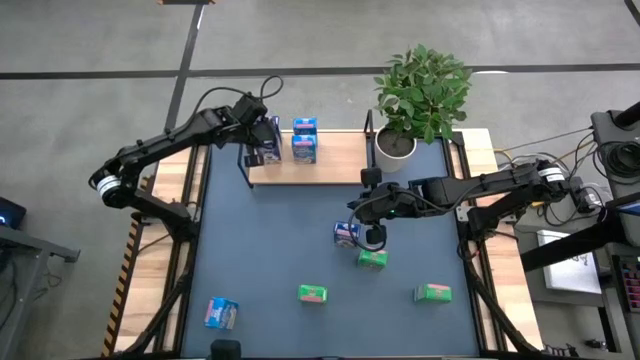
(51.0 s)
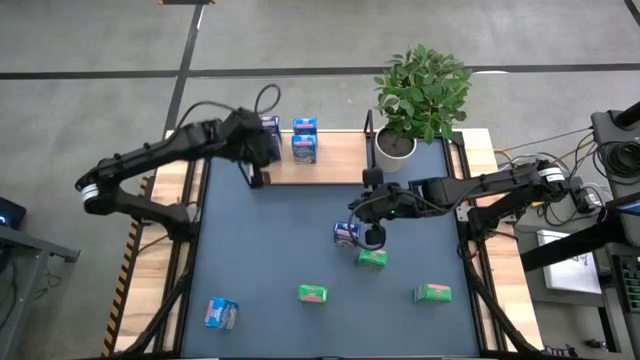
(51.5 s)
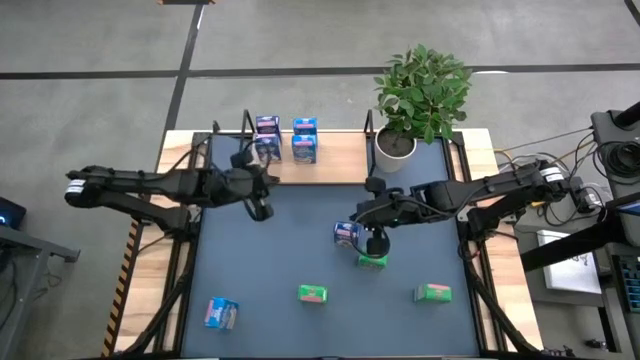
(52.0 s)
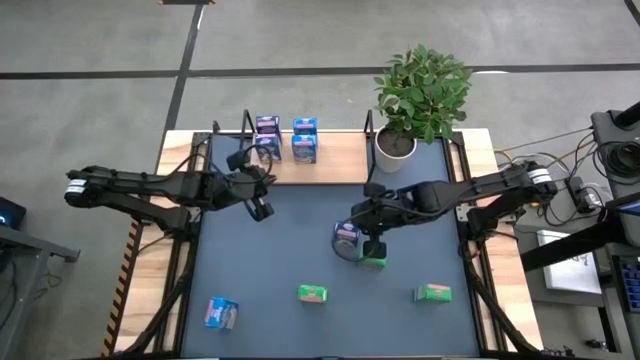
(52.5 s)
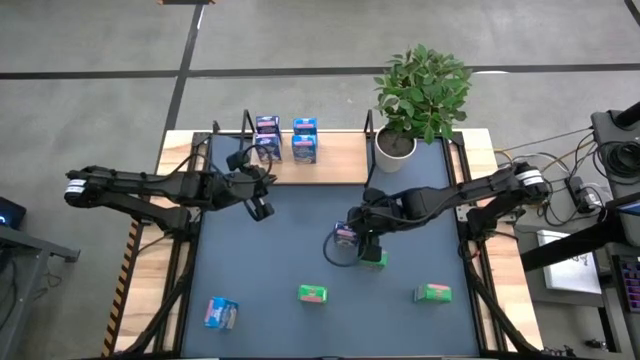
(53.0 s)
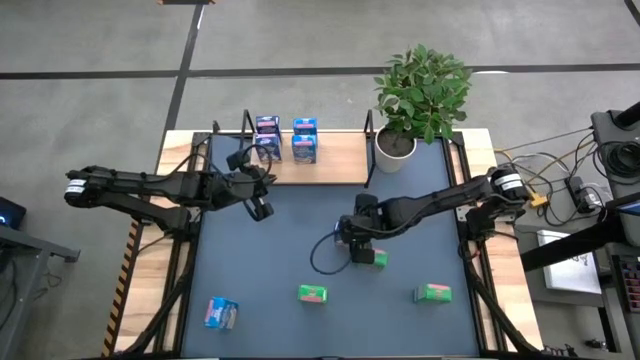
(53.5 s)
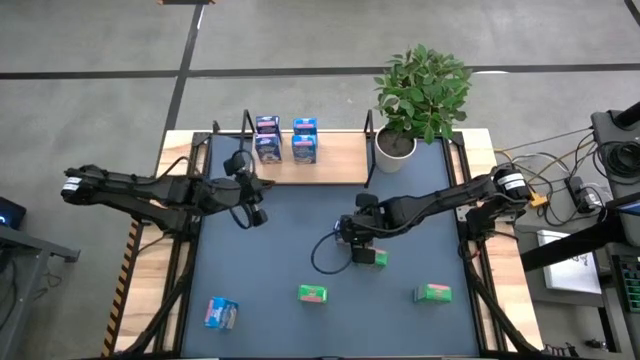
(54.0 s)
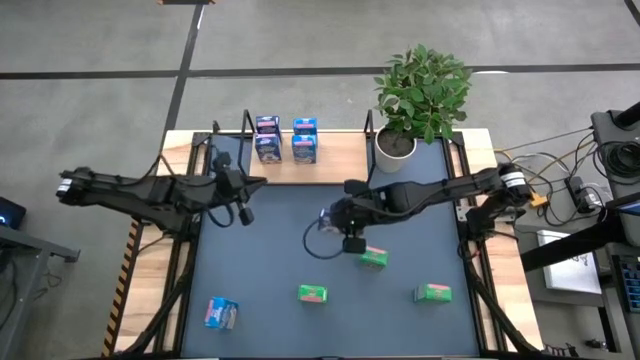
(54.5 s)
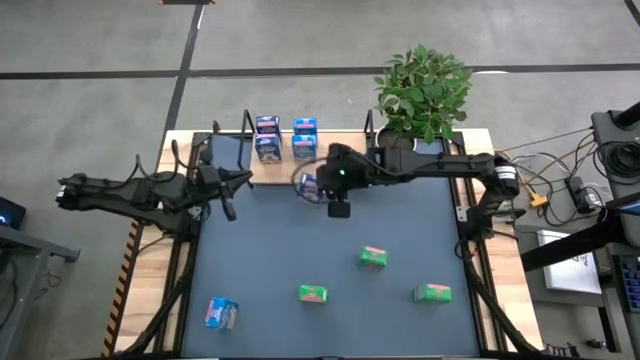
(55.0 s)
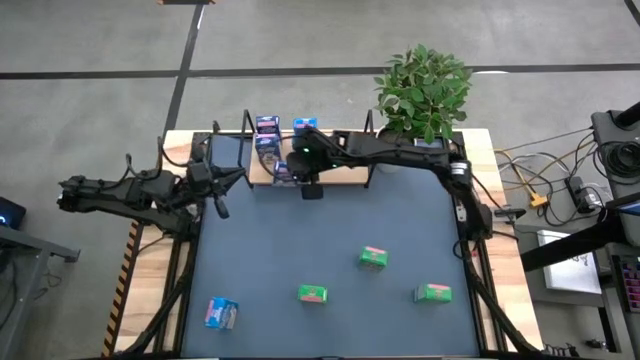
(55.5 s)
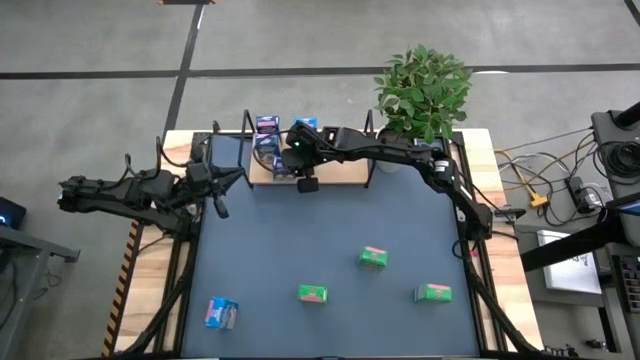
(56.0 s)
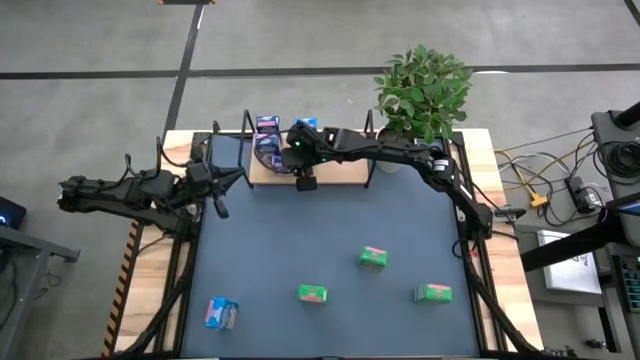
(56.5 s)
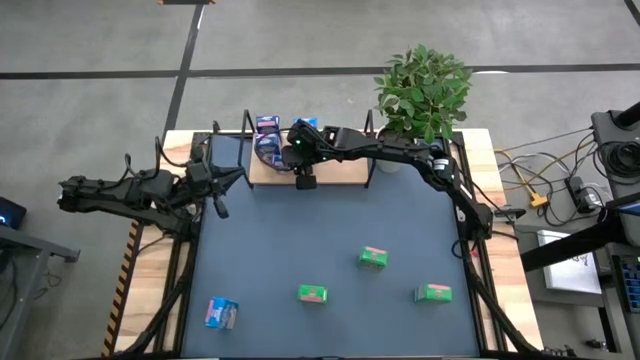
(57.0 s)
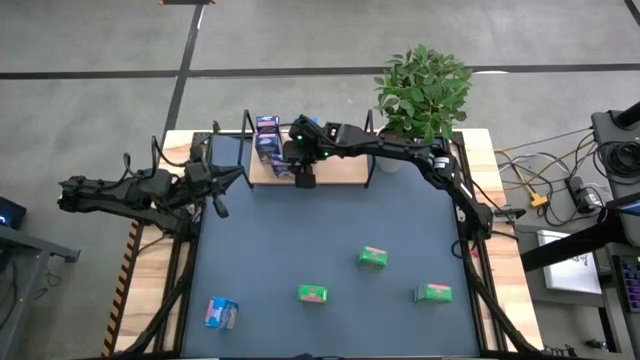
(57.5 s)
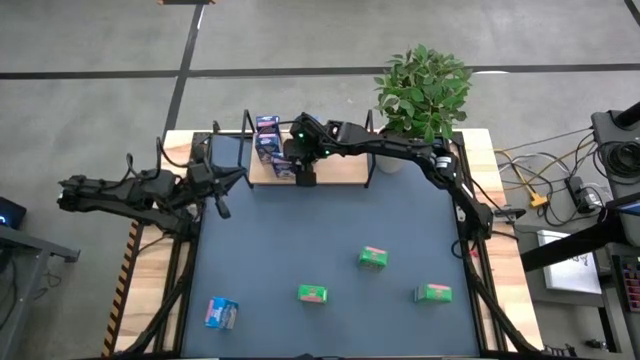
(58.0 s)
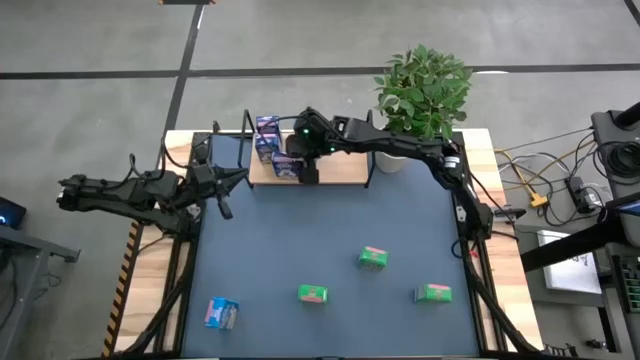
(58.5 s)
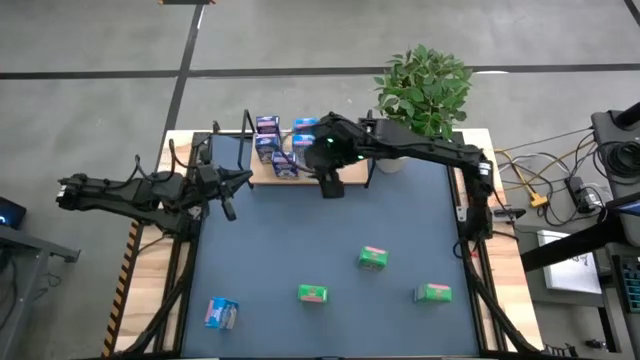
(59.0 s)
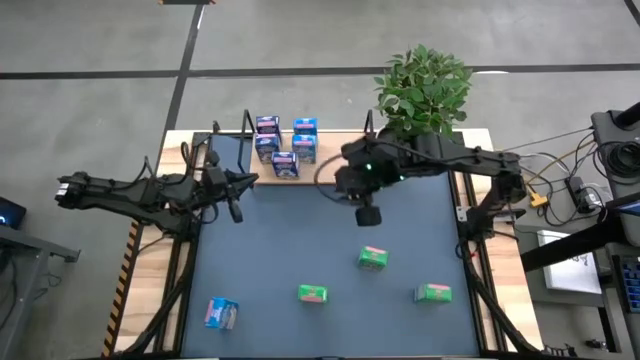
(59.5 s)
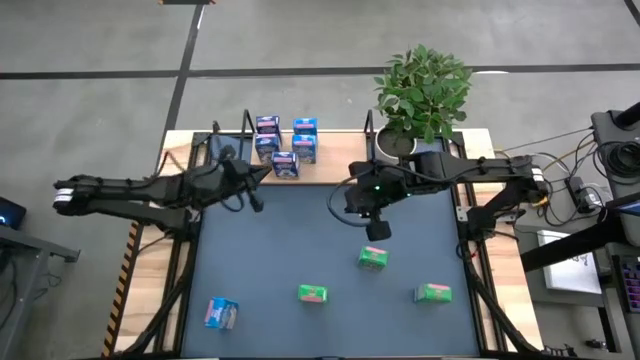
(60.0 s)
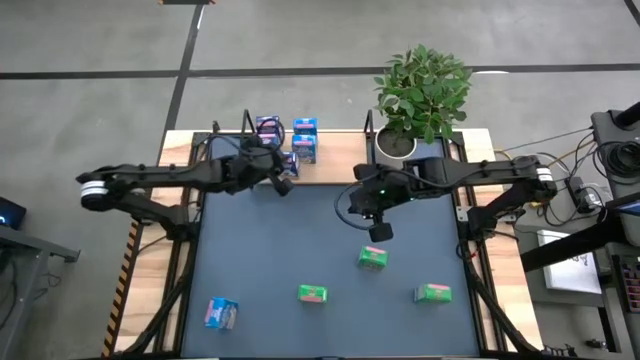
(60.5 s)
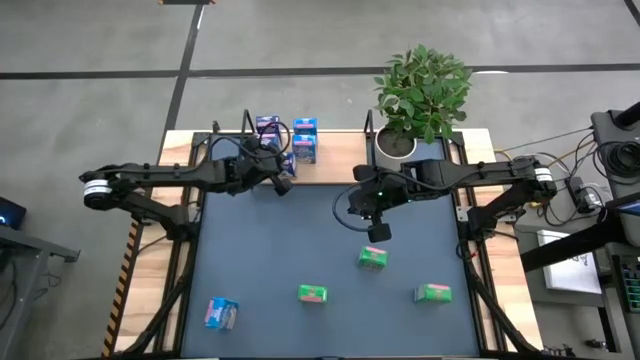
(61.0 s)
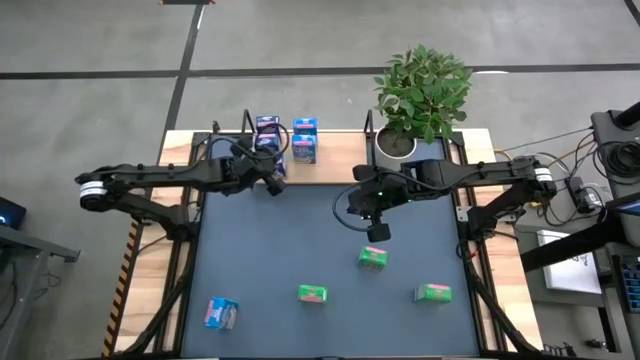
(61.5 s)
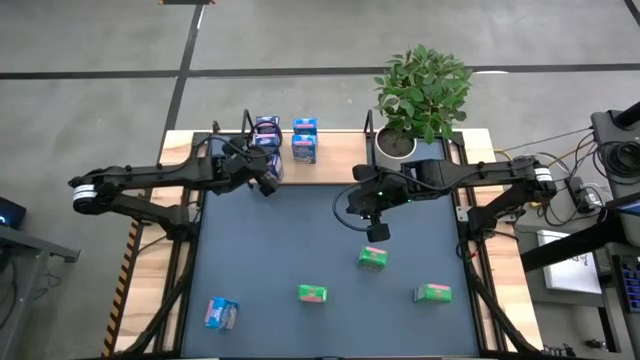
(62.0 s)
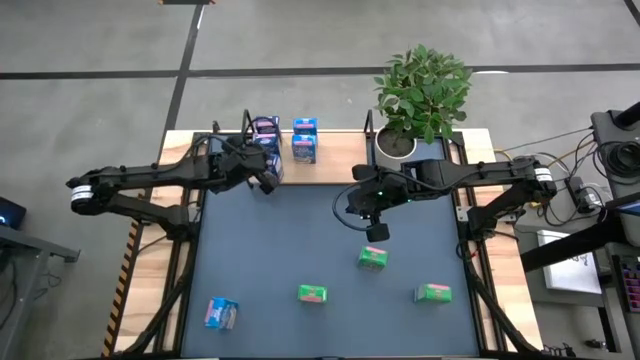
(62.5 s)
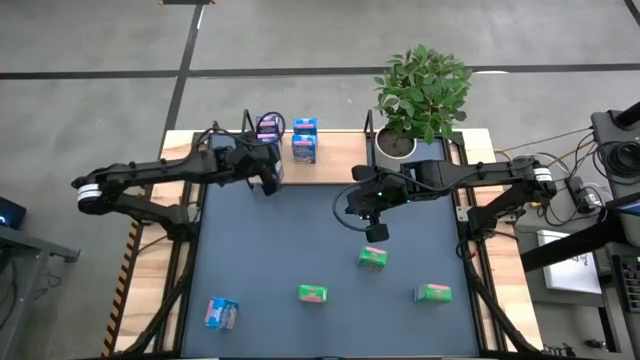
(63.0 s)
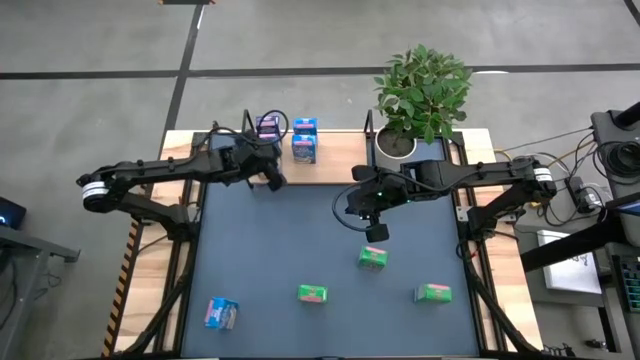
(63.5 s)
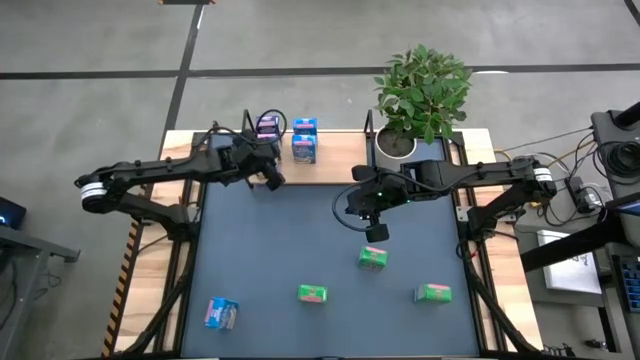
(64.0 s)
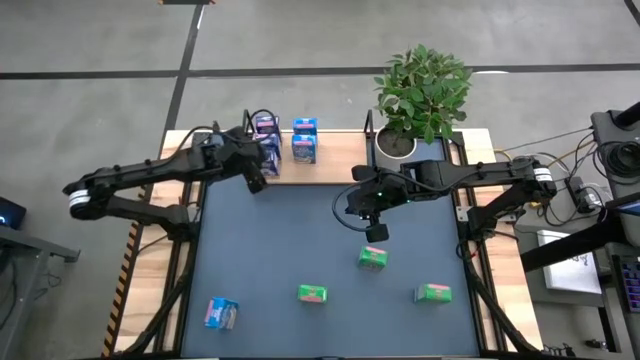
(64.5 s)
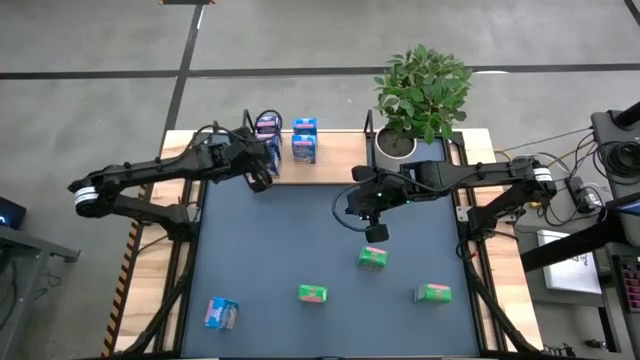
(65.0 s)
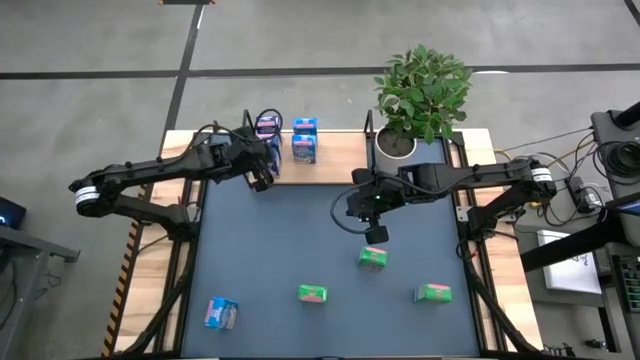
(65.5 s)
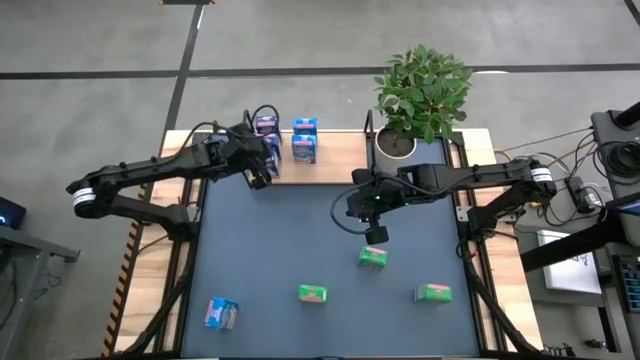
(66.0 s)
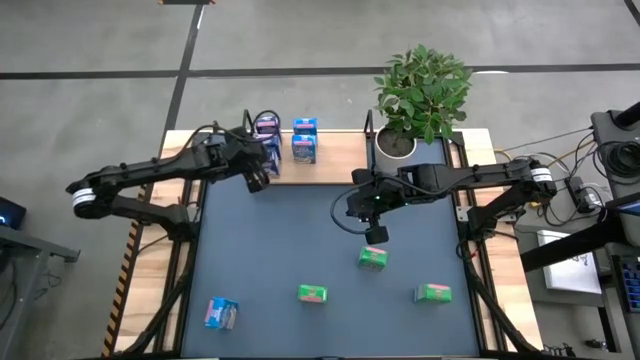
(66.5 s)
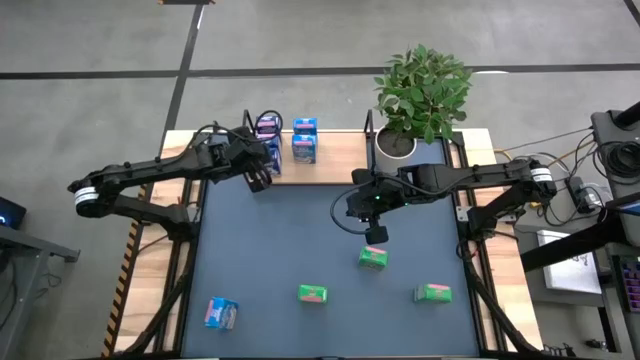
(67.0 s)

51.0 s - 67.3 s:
Task: Stack cereal on shelf
Put the blue cereal box on the shelf aligned with the other blue cereal boxes

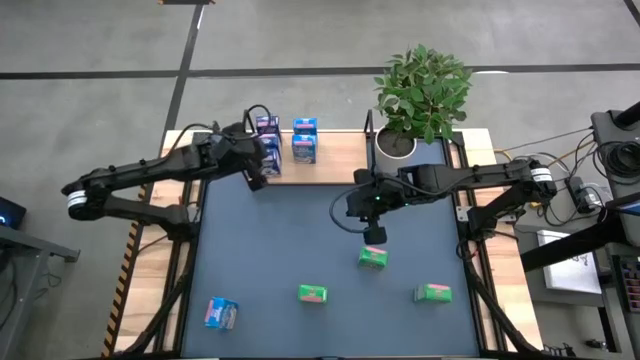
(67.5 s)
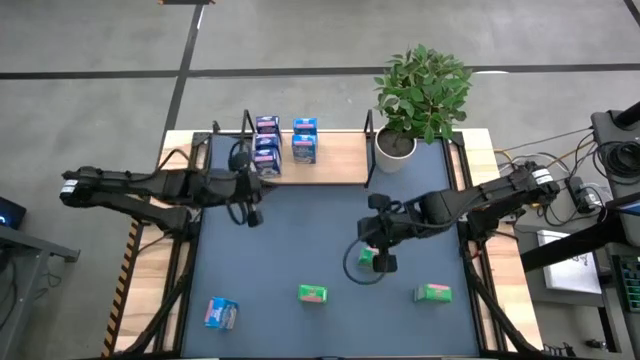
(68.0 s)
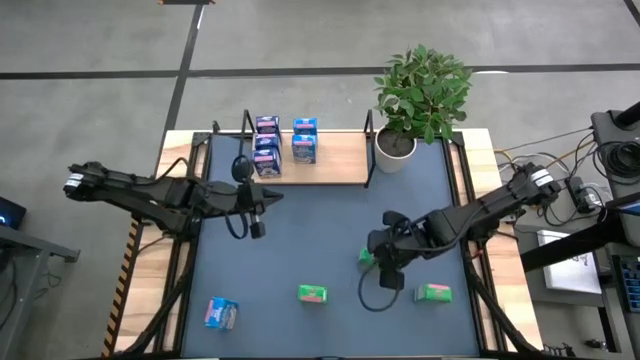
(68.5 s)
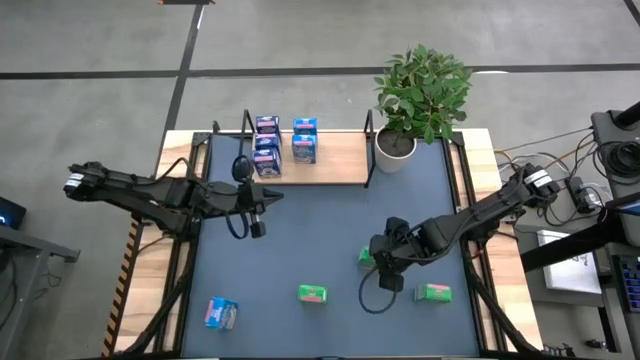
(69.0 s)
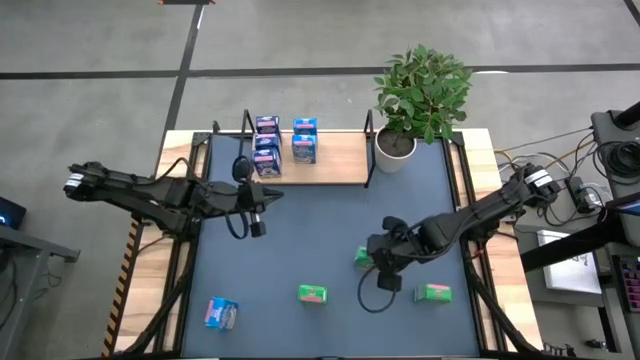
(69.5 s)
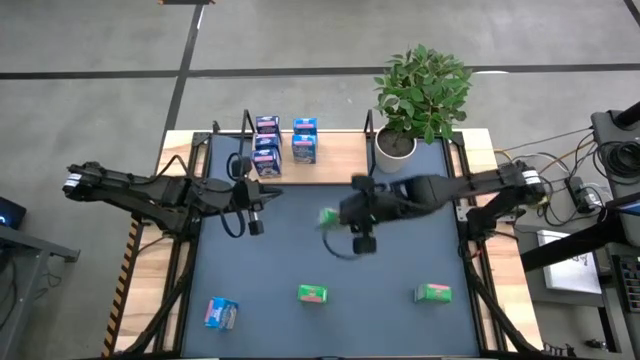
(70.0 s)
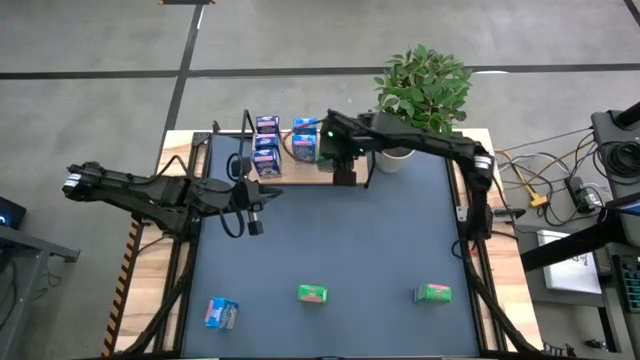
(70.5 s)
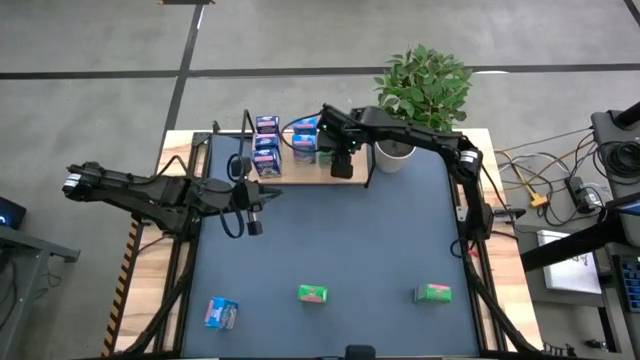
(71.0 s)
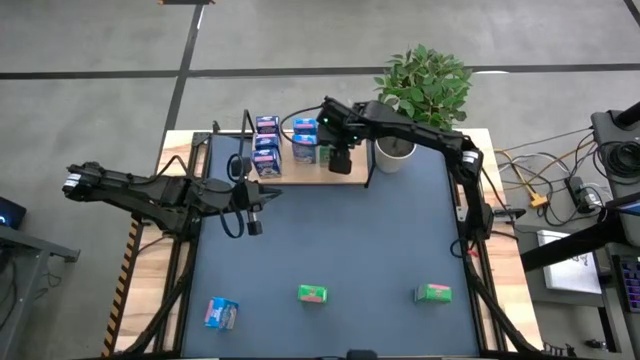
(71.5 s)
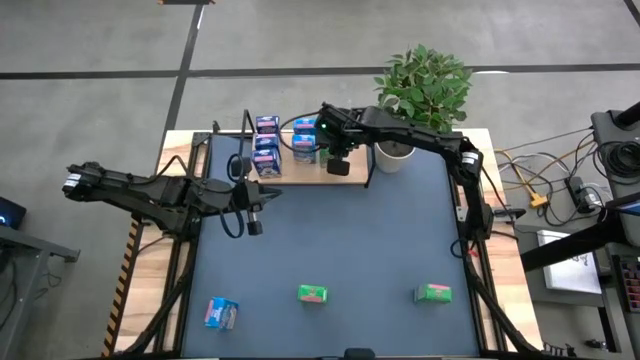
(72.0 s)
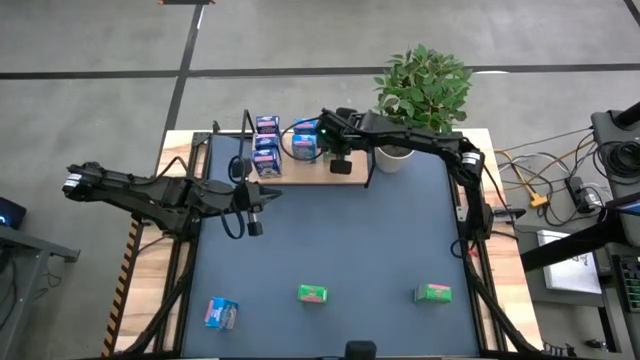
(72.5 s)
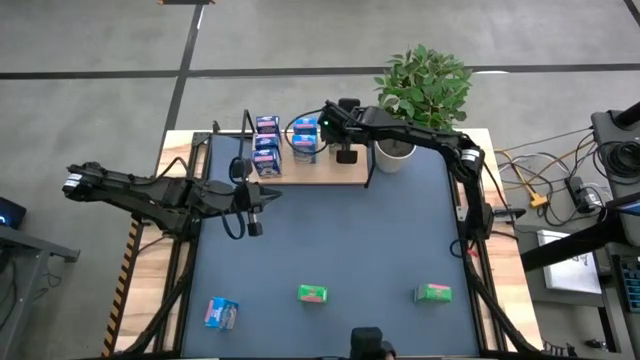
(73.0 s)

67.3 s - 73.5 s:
Put the middle green cereal box on the shelf
